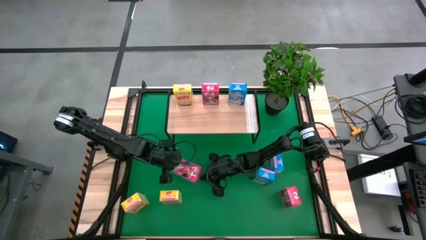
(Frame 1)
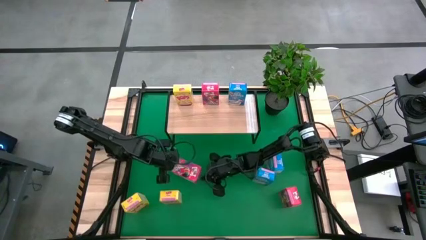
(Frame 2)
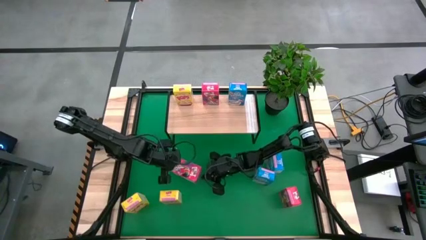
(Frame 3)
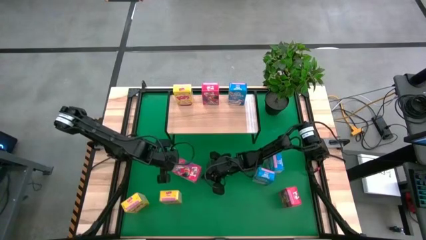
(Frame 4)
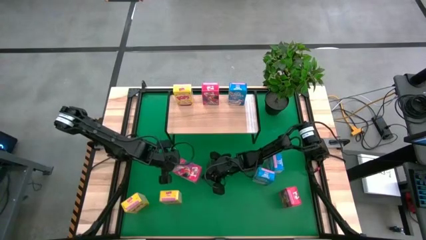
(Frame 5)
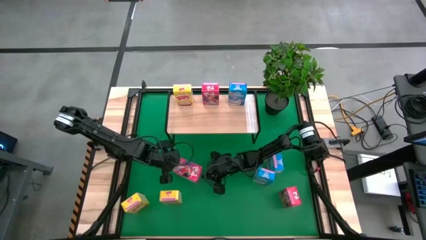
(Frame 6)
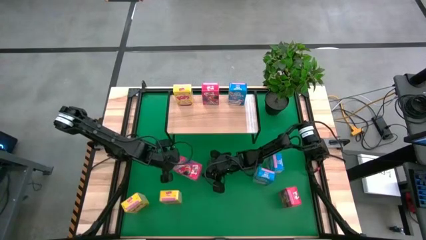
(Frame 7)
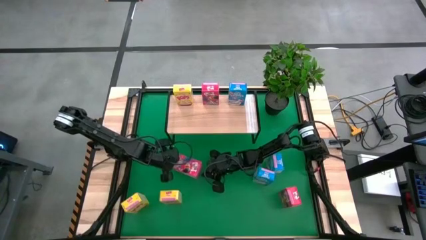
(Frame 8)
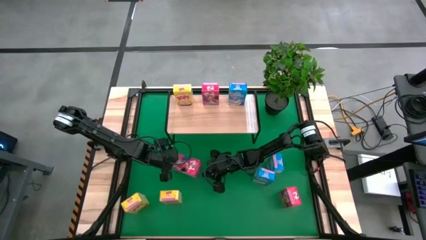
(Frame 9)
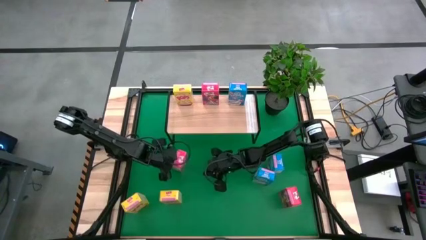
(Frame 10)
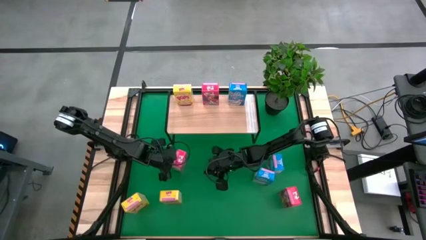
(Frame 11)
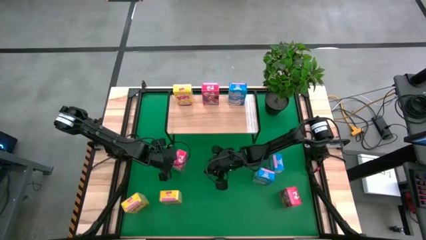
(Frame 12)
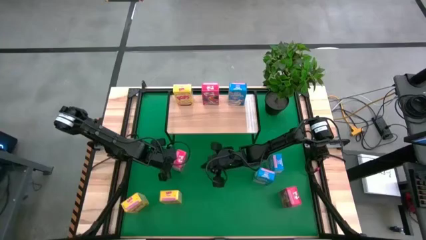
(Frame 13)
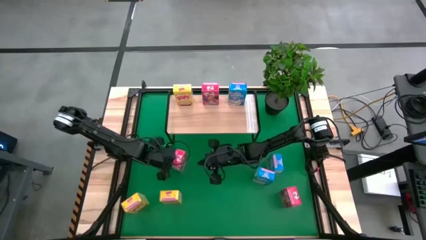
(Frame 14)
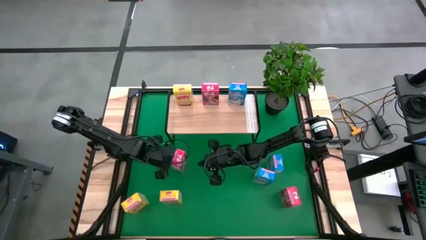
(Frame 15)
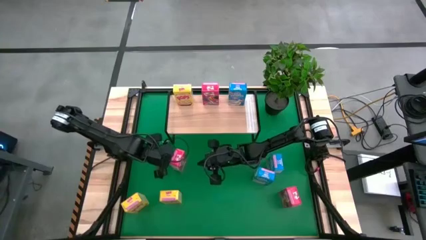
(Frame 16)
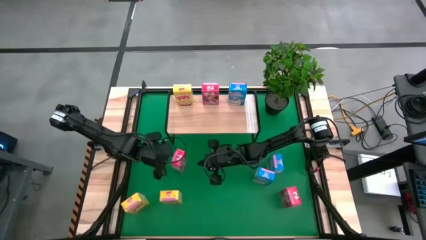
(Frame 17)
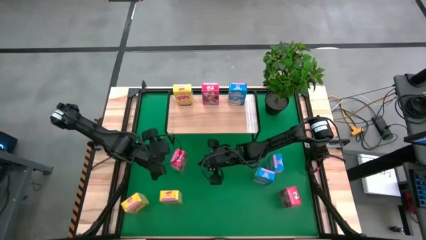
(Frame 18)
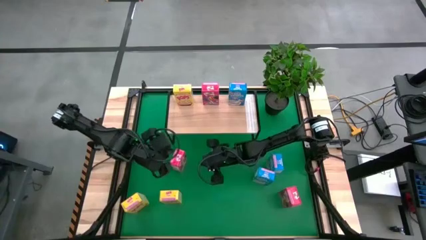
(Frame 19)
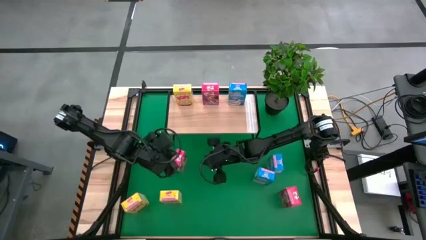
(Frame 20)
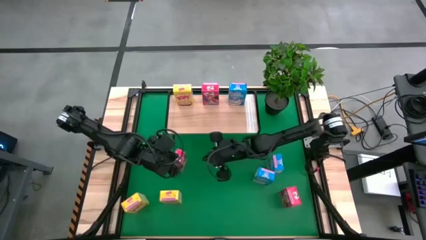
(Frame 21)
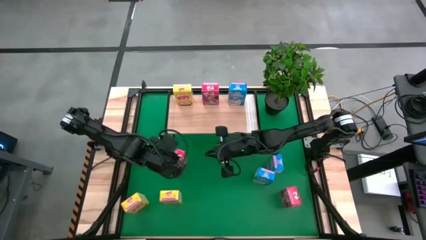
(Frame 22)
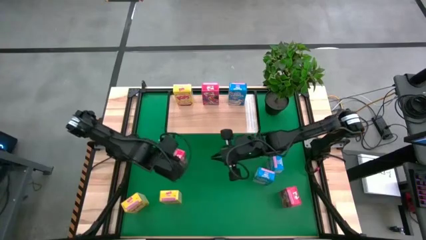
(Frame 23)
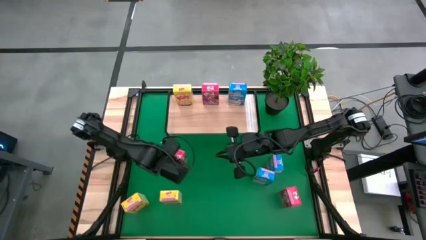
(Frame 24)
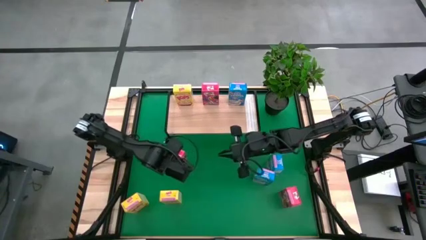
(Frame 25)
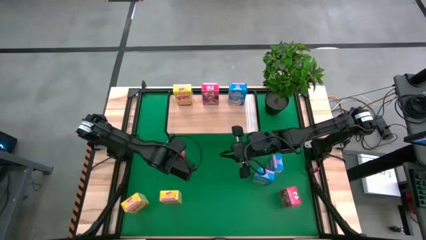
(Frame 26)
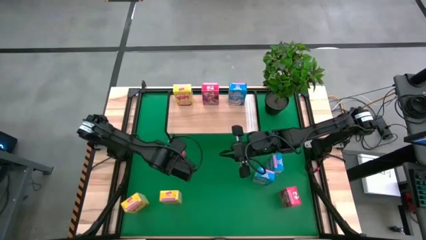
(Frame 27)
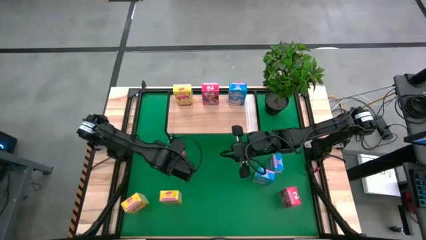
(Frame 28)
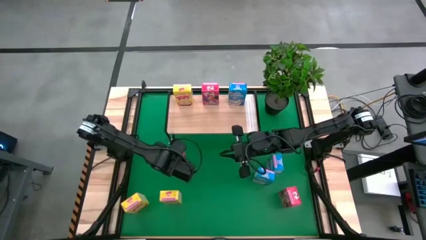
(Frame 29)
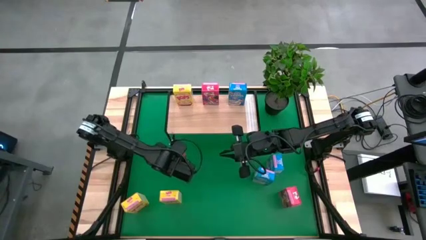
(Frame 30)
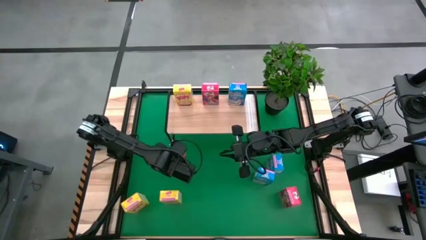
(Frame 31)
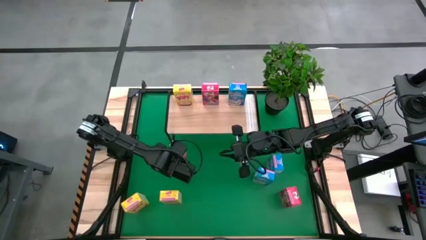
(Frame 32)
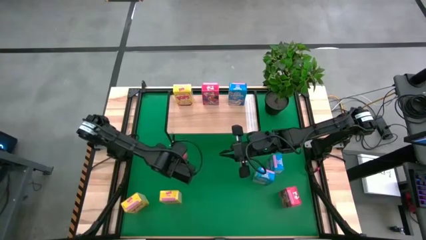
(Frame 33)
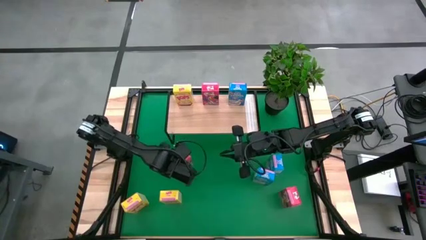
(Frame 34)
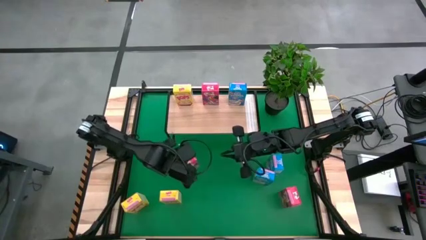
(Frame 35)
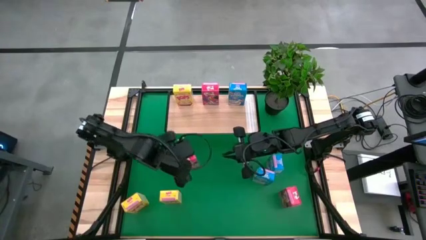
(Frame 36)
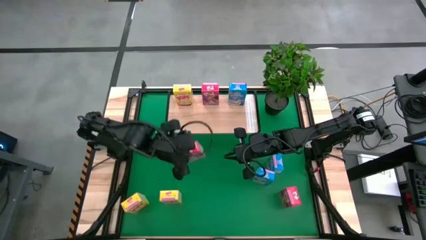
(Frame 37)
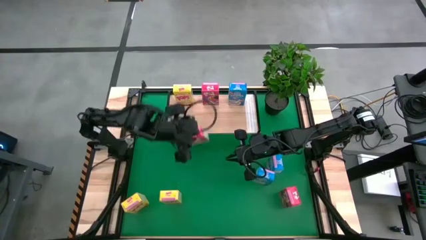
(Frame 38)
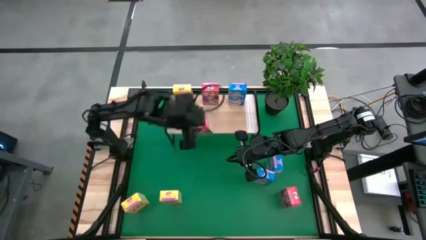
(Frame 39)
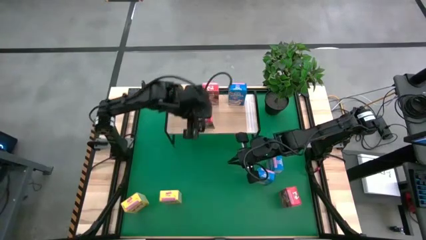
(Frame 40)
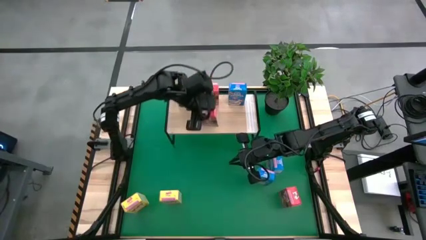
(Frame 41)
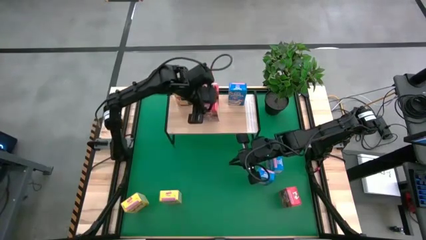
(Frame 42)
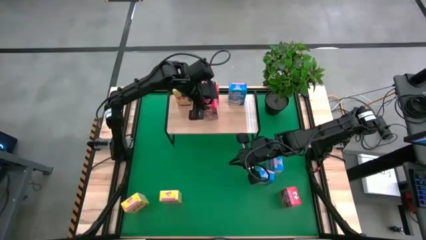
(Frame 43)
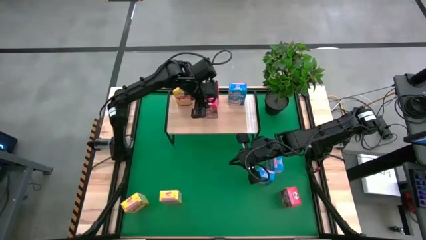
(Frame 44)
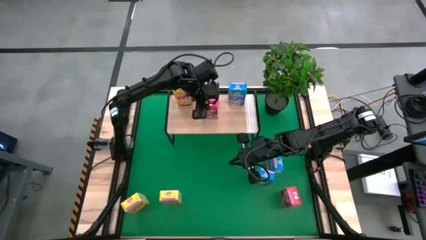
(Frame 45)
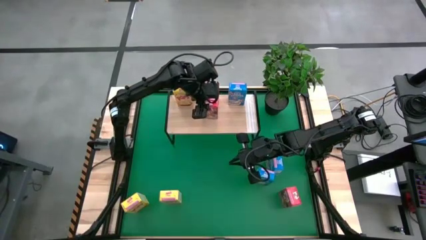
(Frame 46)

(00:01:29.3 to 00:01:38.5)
Task: Stack cereal on shelf
Put the top red cereal box on the shelf aligned with the other red cereal box

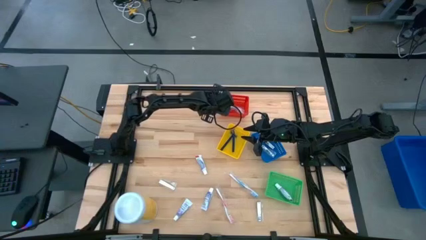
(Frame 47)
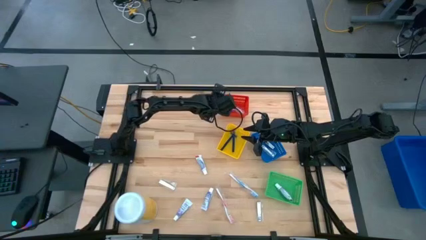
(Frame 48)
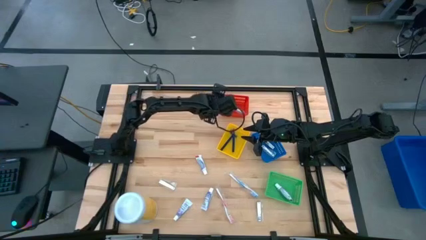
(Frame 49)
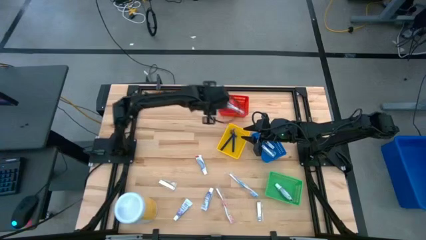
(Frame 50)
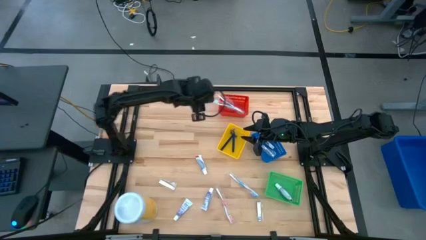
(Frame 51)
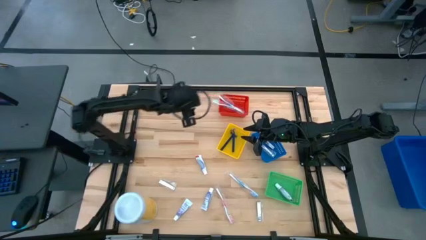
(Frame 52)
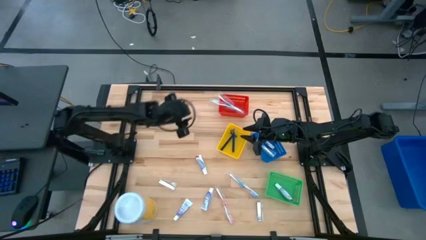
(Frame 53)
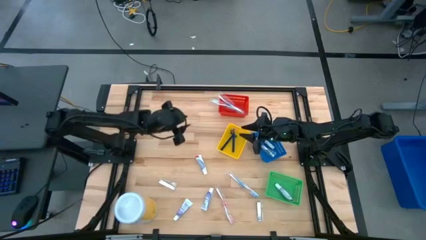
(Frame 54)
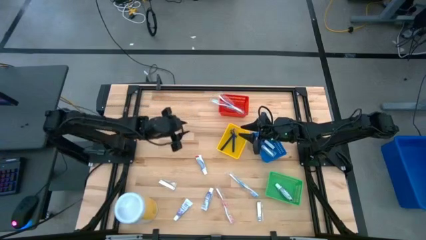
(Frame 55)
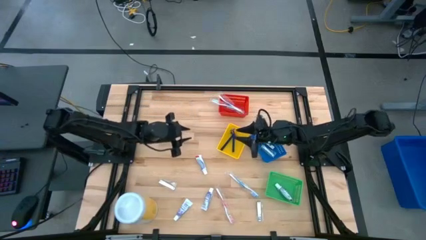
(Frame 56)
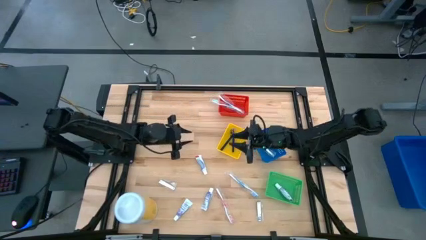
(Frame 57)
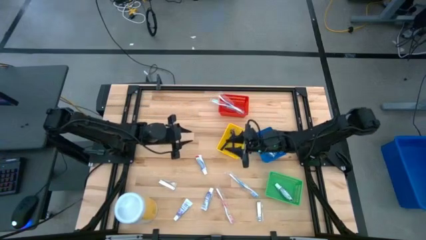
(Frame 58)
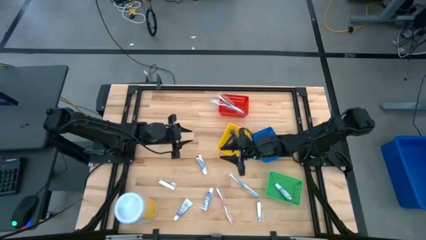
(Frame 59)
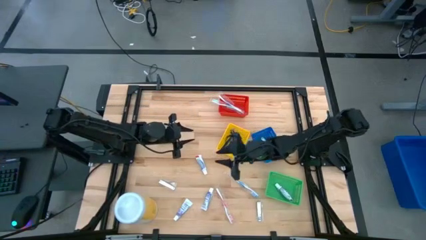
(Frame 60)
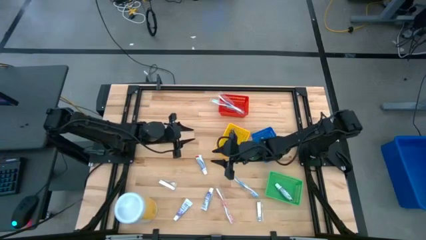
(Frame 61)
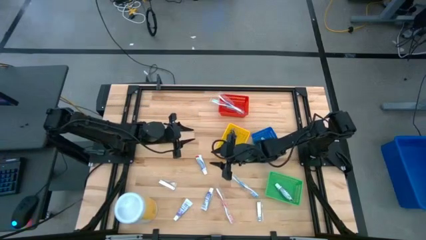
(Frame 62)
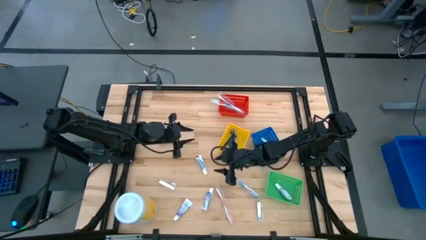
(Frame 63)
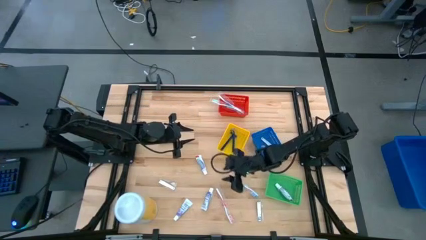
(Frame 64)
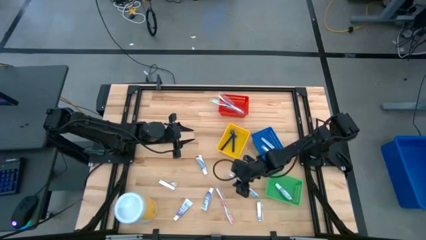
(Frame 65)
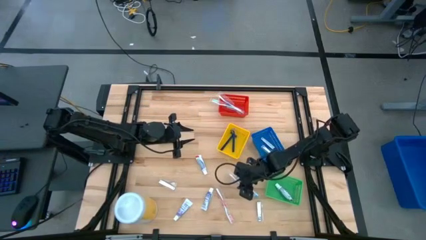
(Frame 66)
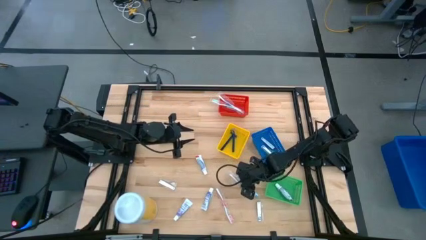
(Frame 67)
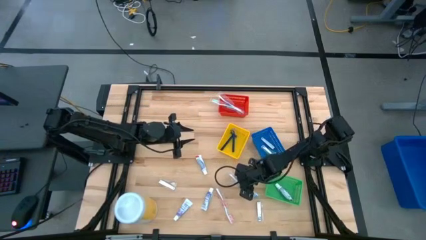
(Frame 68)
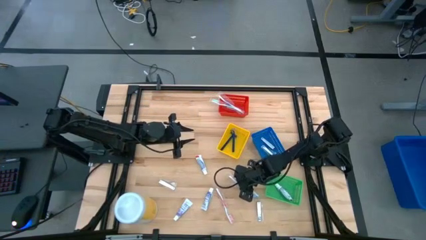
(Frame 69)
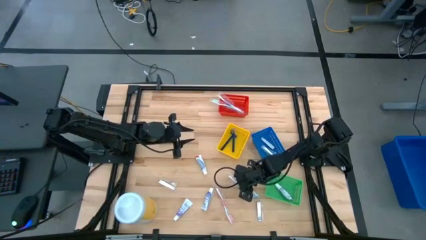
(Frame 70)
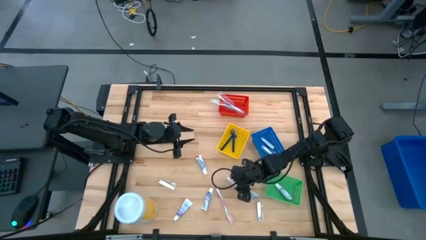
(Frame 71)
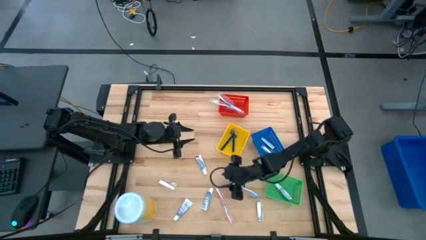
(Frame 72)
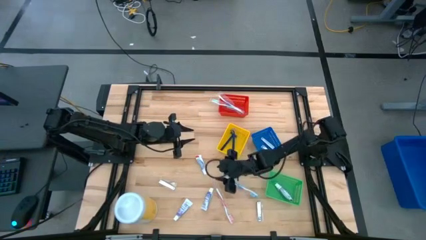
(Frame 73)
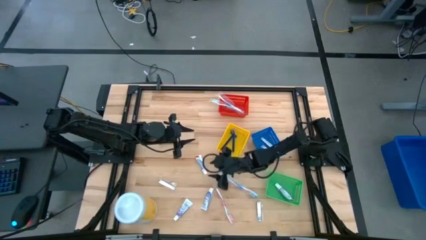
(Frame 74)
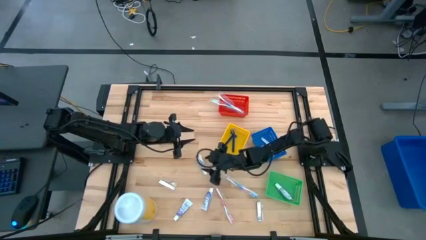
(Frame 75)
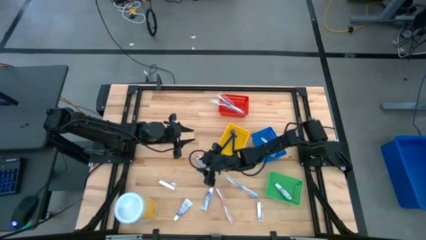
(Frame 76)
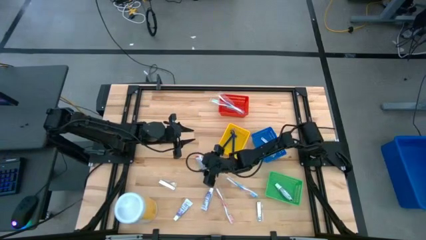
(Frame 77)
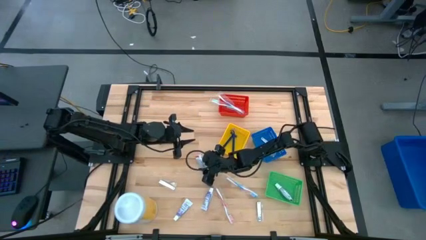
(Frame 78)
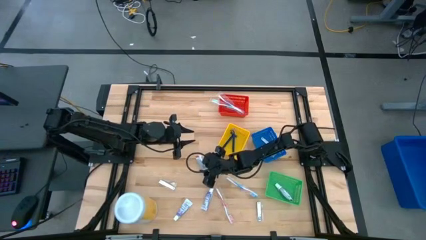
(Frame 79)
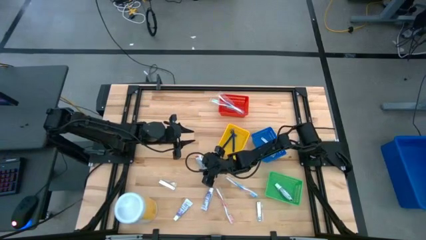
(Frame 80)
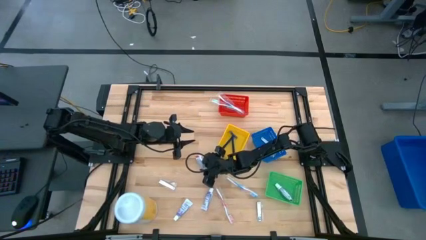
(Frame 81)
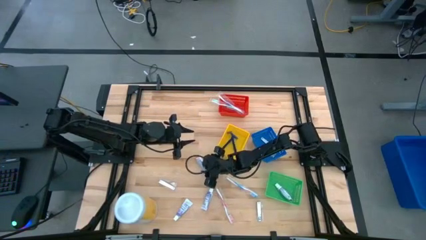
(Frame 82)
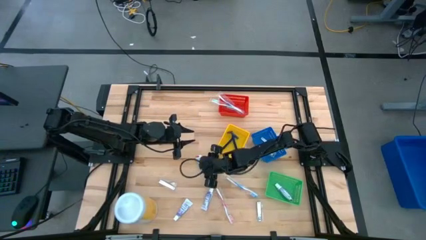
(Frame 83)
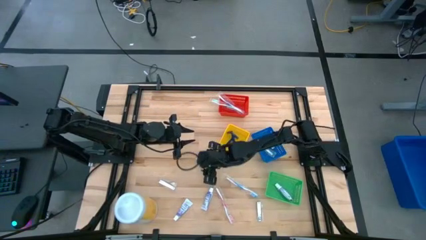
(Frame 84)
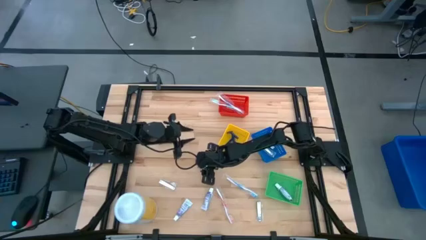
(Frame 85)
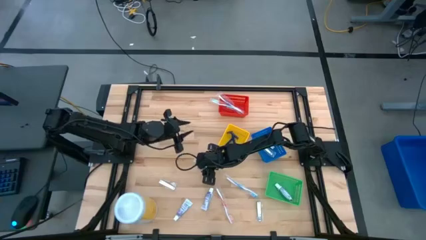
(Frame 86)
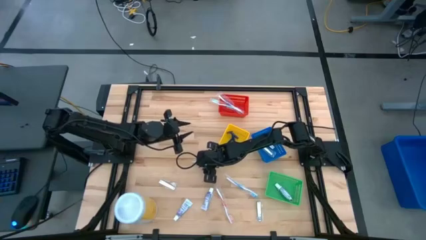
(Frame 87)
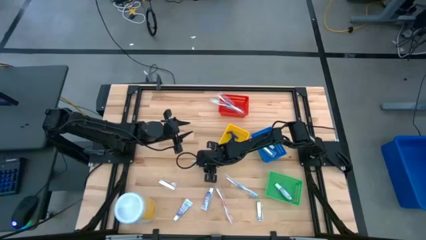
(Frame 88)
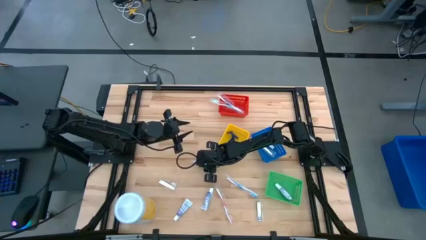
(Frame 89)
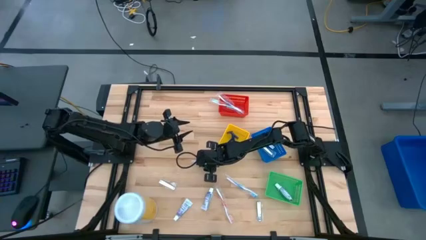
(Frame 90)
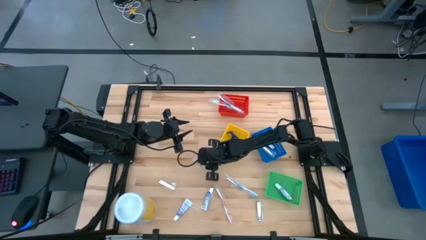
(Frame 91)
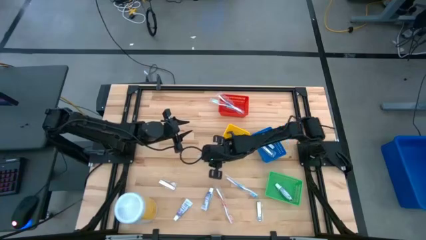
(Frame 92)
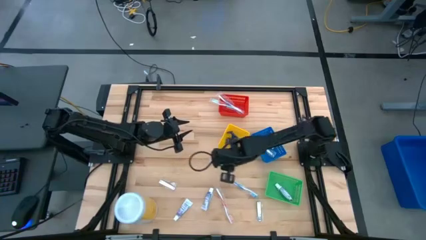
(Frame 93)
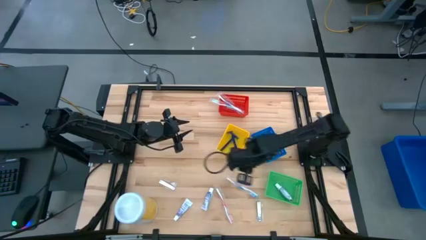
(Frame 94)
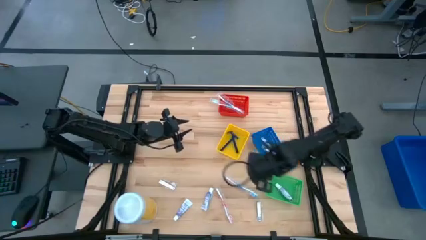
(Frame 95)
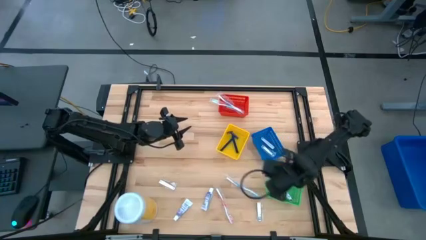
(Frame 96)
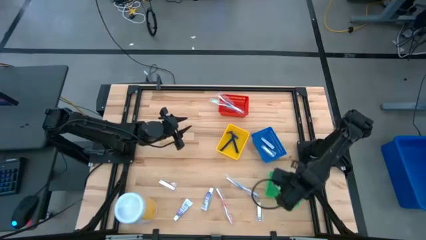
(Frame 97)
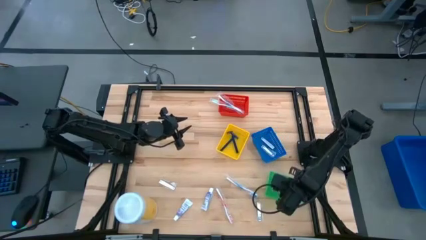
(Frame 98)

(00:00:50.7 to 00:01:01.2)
Task: Pick & Place Travel size toiletries
Put the toothpaste into the green bin
